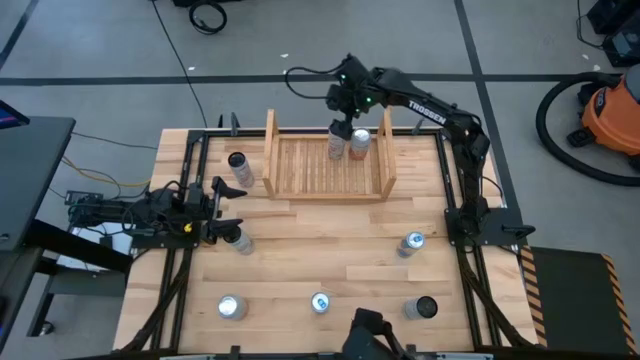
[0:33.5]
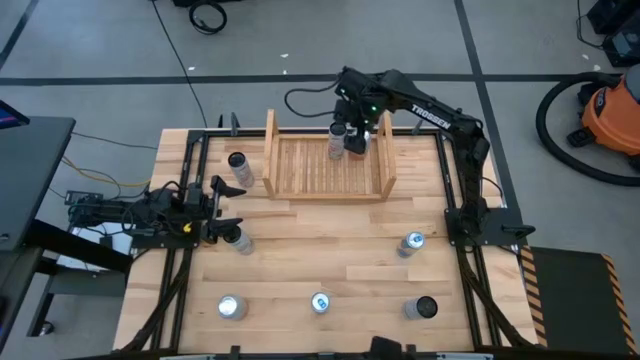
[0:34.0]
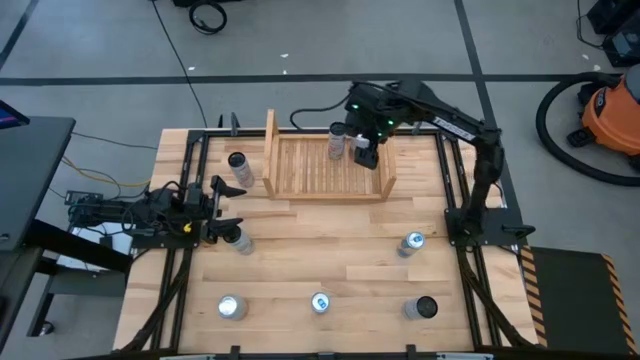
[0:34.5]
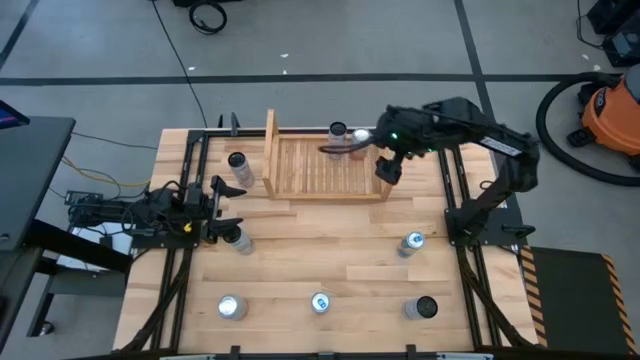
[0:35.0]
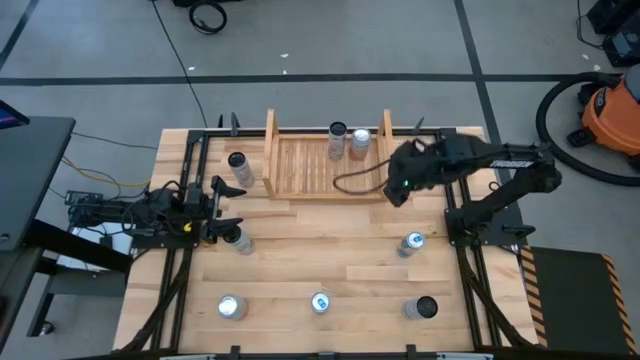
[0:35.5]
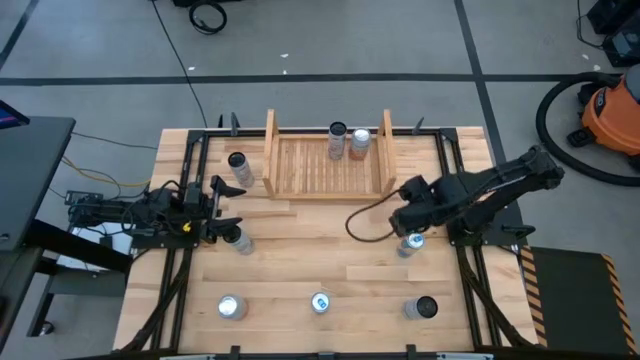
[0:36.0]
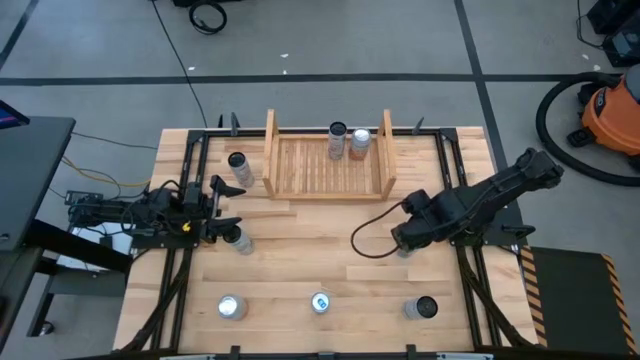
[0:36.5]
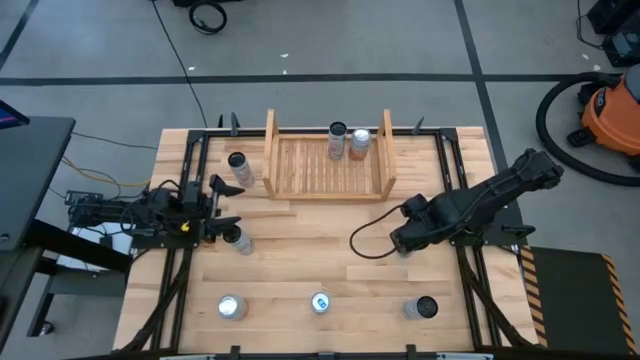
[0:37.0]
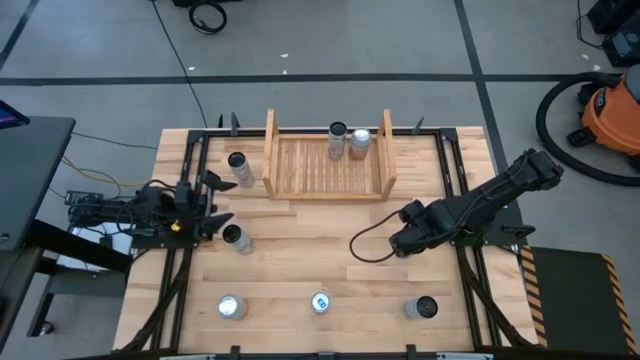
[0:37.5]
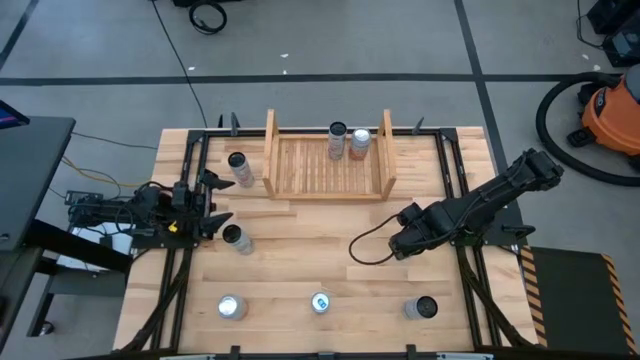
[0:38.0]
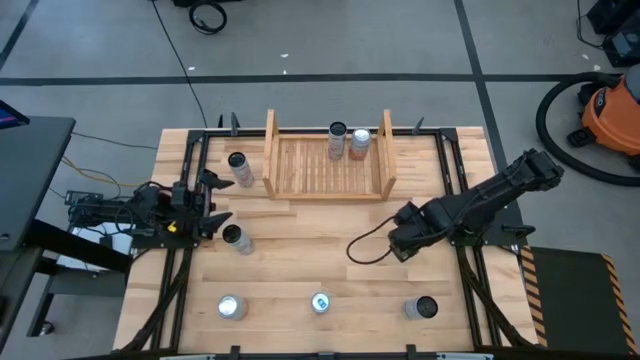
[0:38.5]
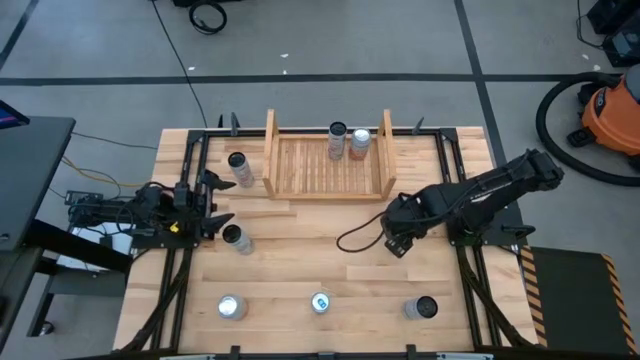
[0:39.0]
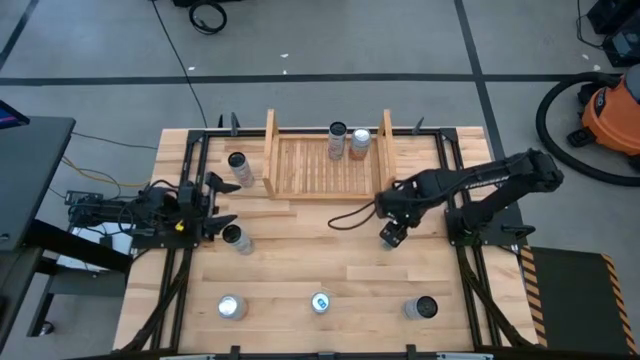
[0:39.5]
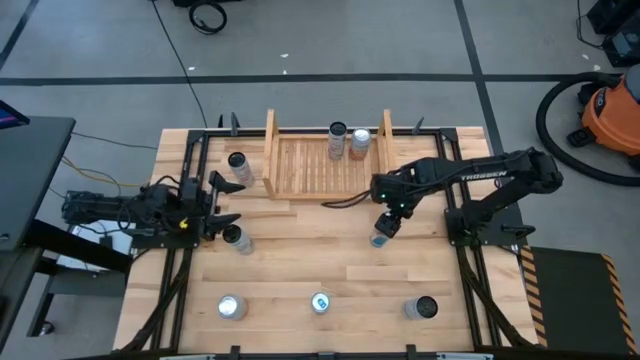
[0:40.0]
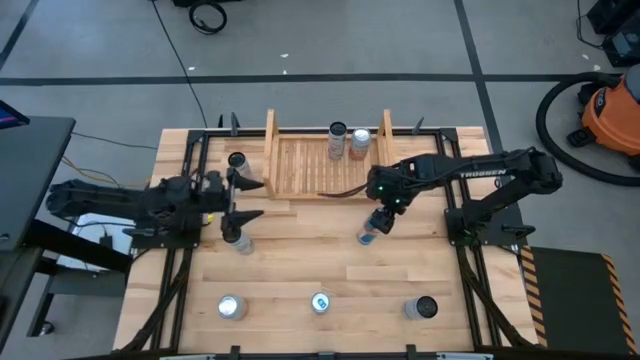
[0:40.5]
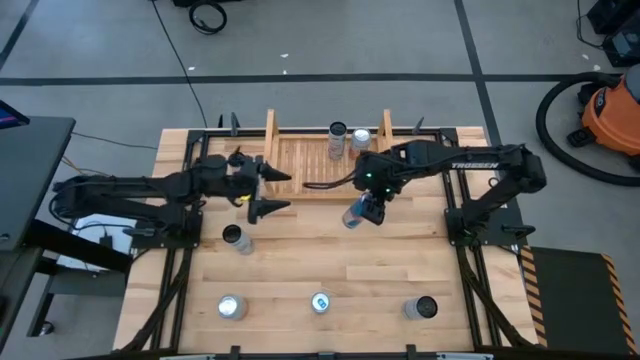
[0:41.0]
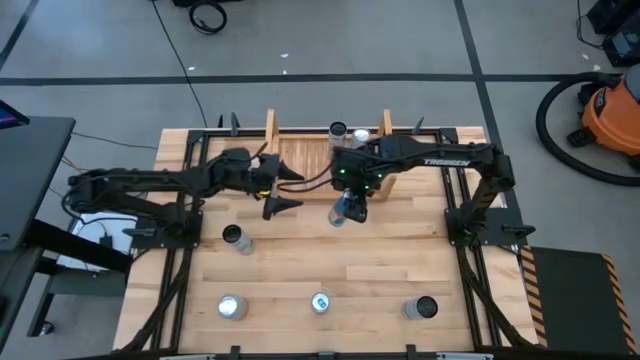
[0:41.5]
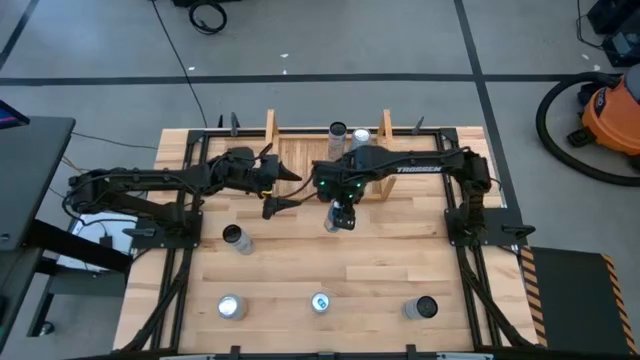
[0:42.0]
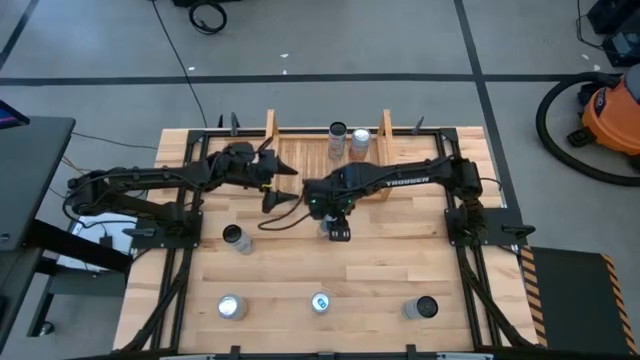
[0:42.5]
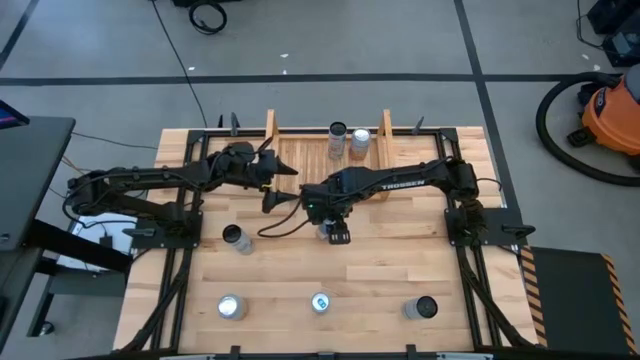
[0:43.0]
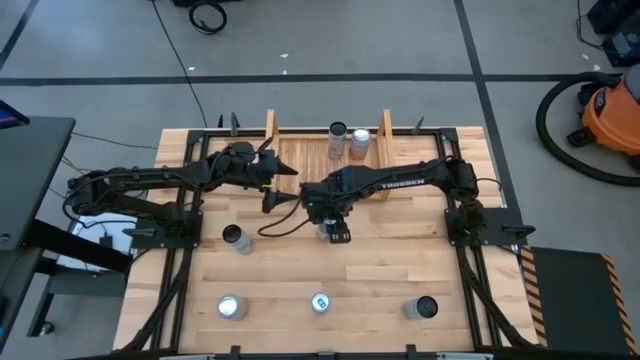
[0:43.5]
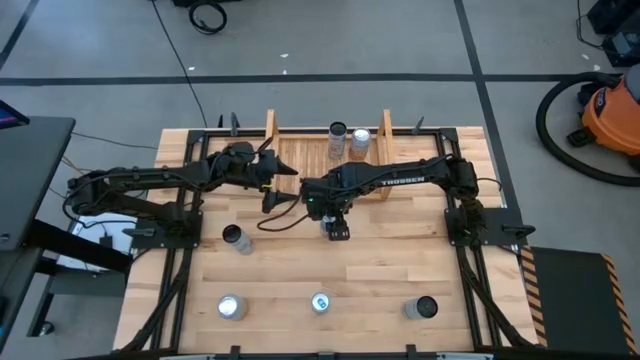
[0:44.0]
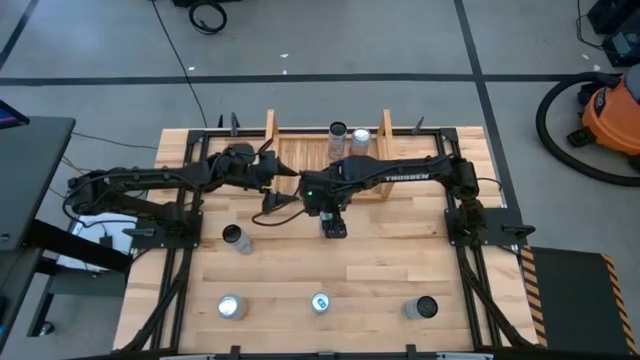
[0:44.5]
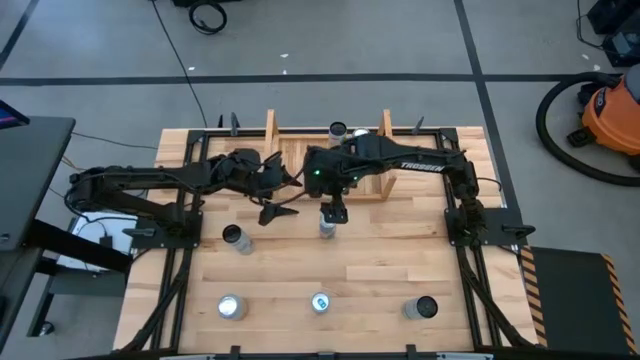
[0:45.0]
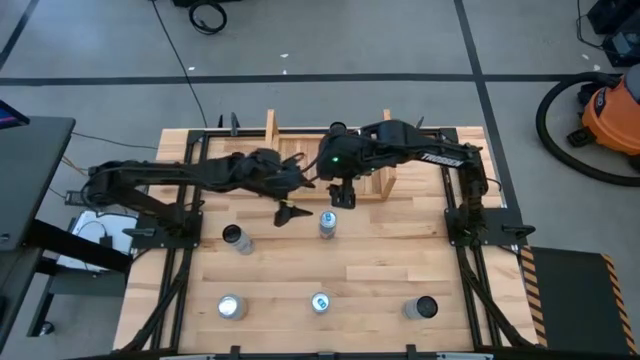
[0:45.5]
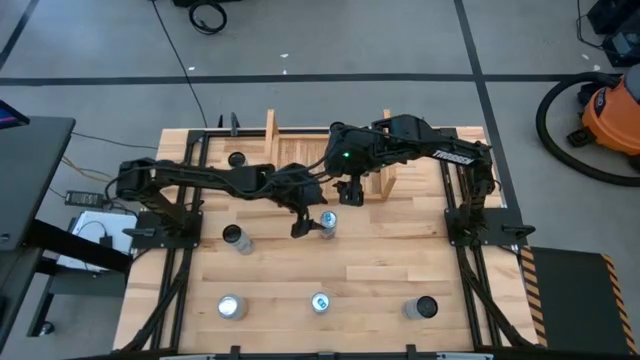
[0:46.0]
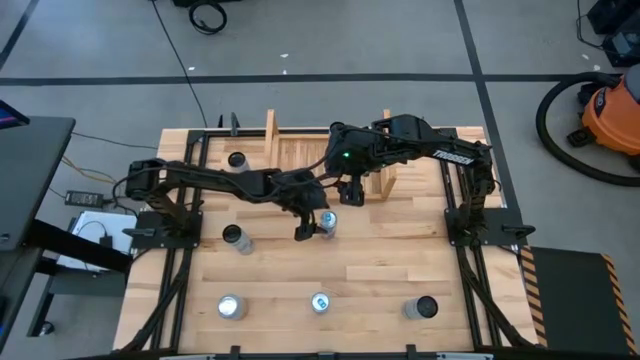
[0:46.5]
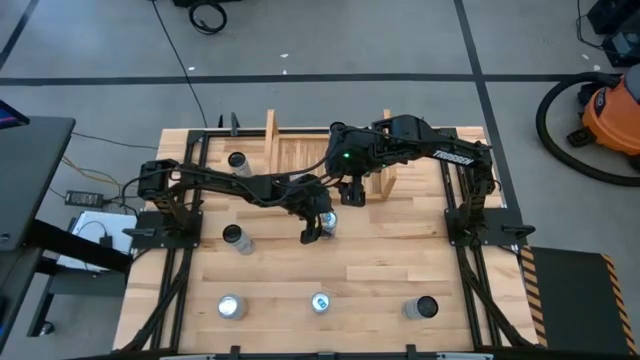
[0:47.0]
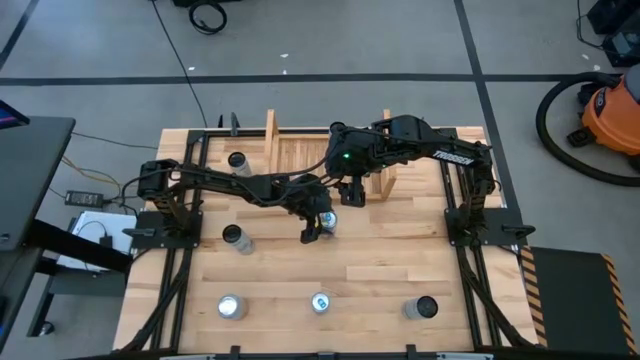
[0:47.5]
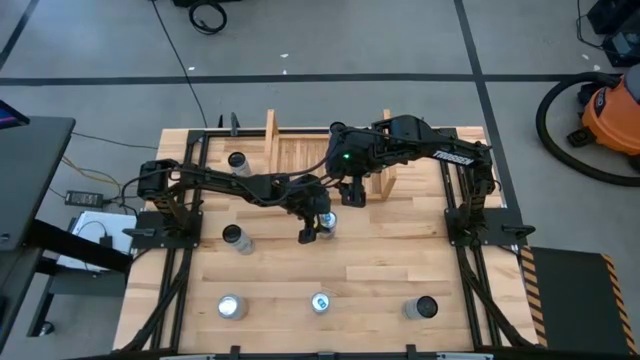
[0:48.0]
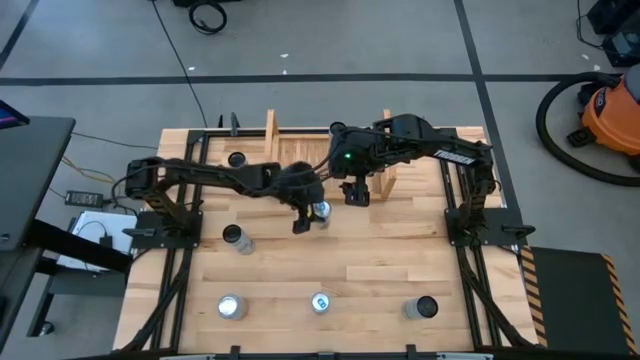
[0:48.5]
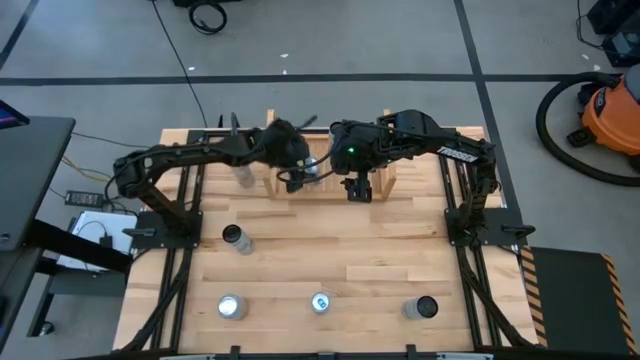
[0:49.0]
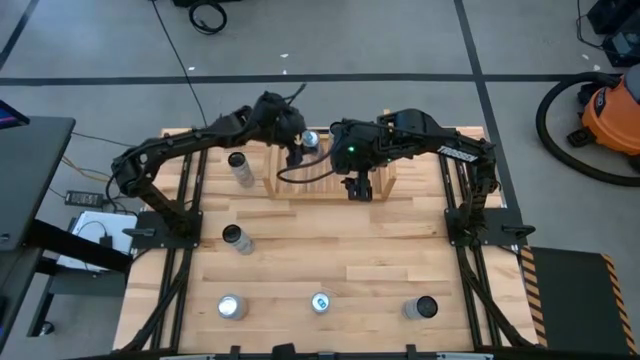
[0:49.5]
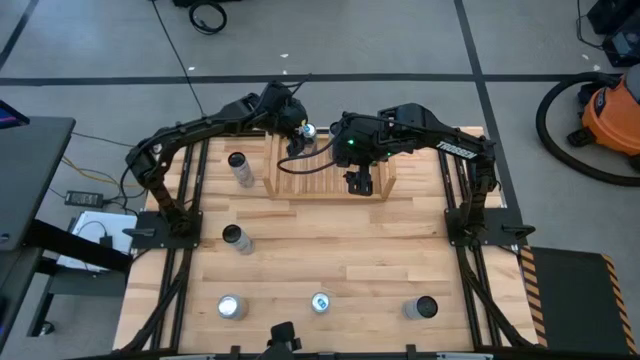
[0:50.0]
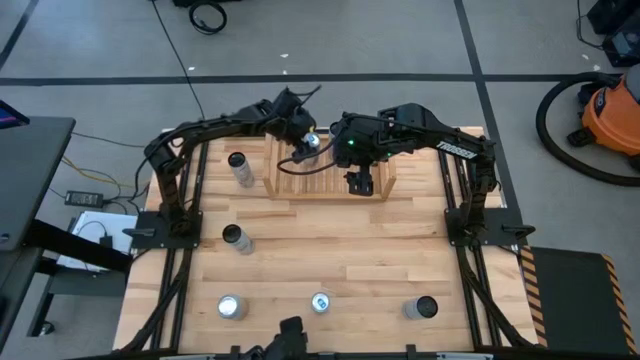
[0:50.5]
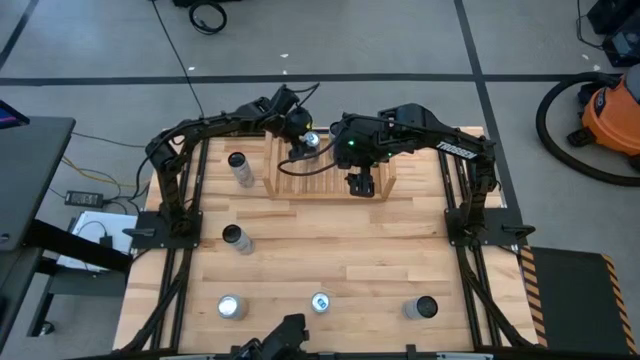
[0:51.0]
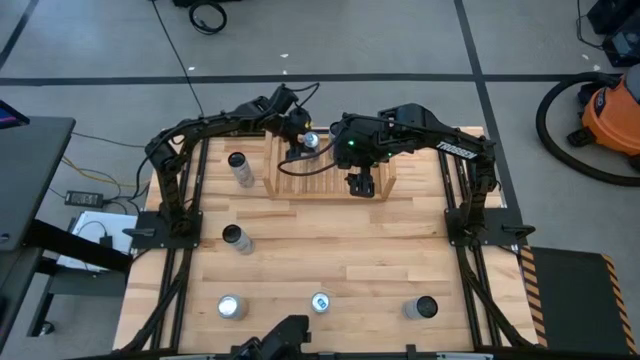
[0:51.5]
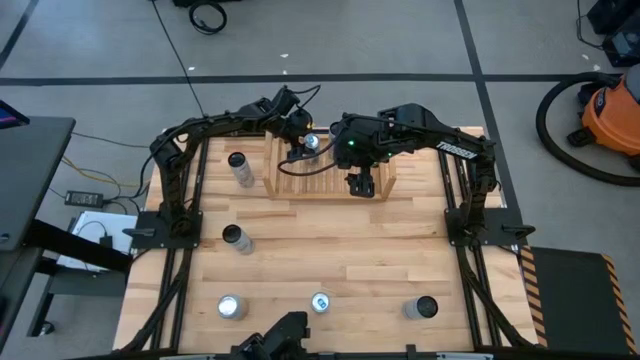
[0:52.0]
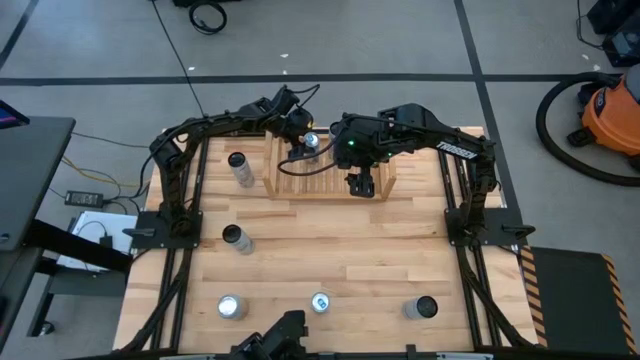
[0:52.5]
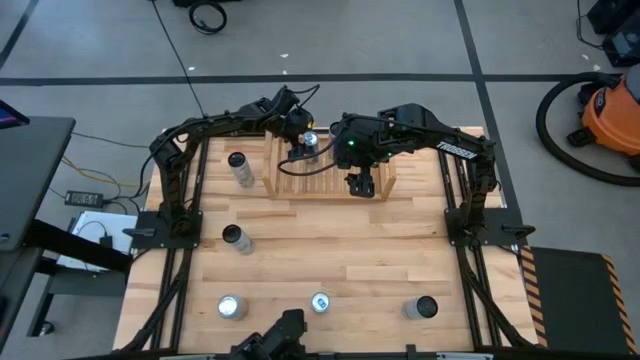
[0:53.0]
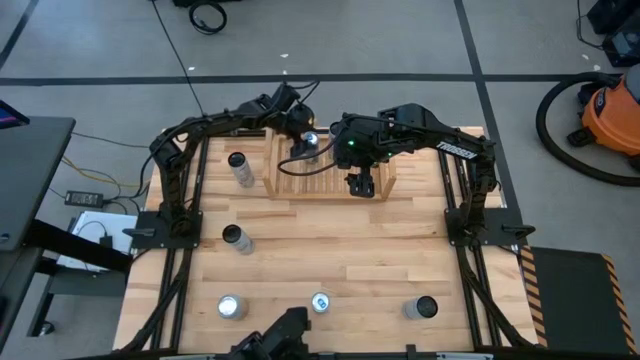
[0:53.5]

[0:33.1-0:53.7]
Task: Place canned beverage on shelf
Put the top blue soda can on the shelf

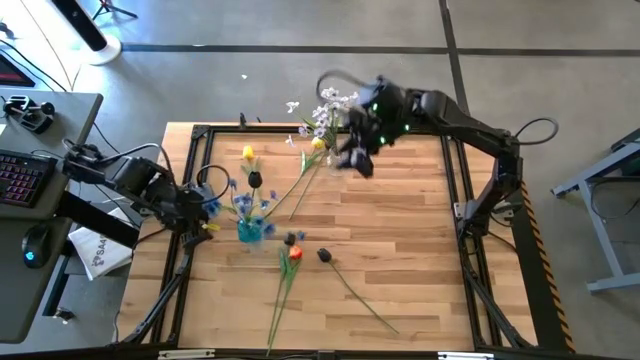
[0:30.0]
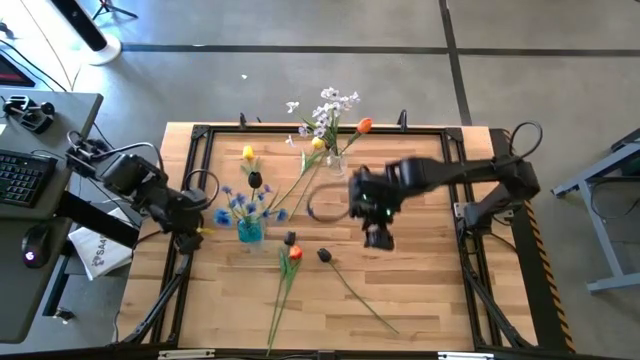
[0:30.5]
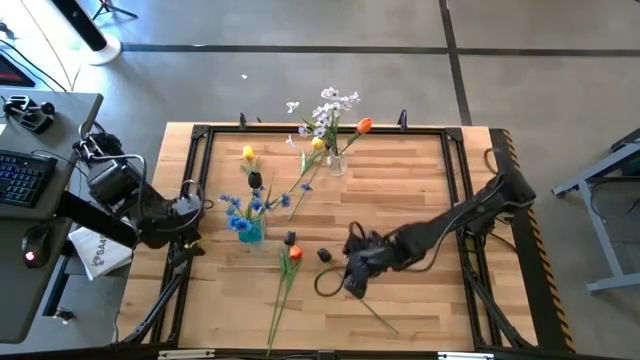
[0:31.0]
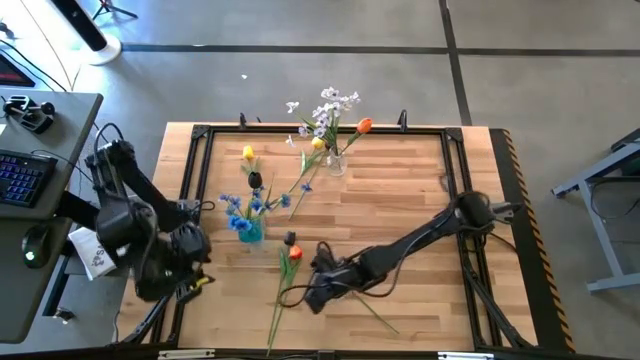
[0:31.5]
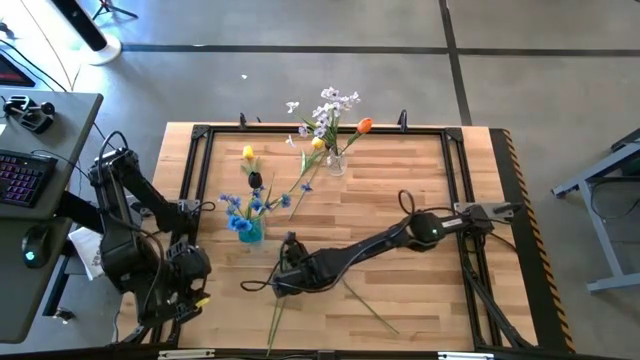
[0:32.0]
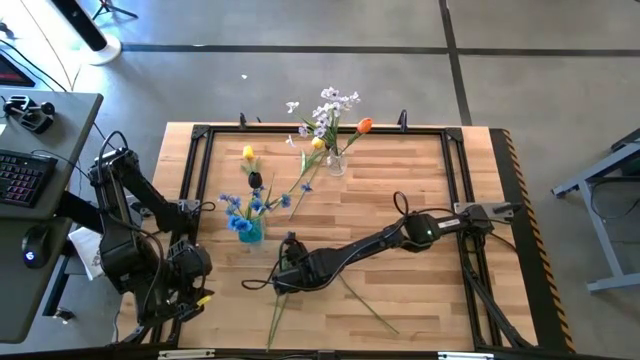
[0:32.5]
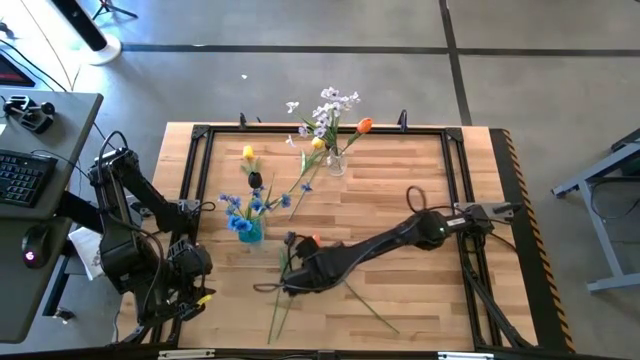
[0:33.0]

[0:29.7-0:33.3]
Task: Sort flowers into vase by color
Put the orange flower into the transparent vase
